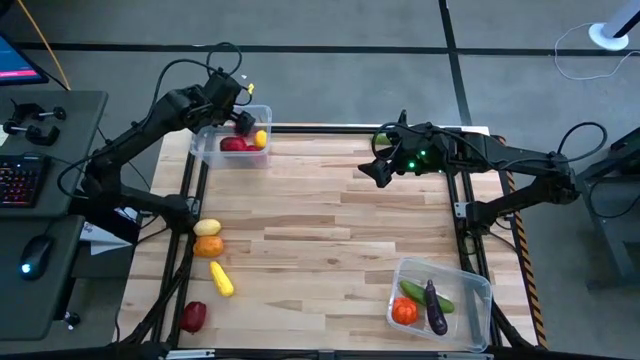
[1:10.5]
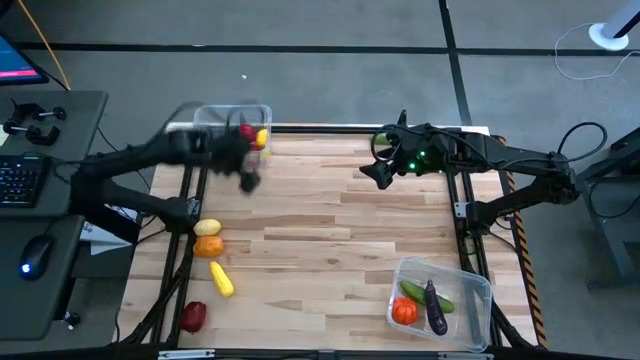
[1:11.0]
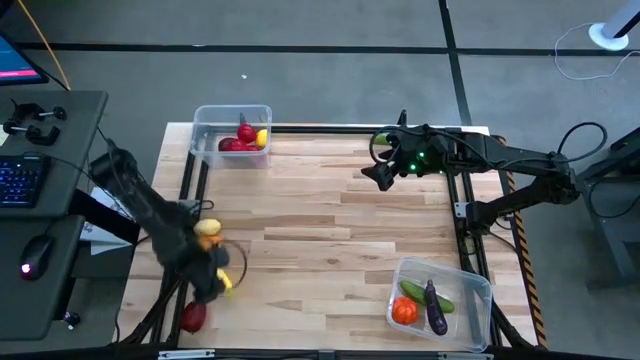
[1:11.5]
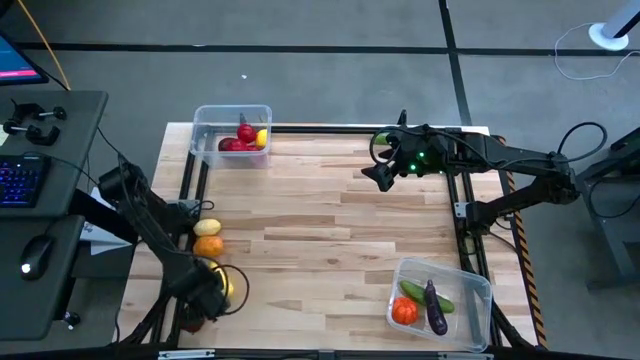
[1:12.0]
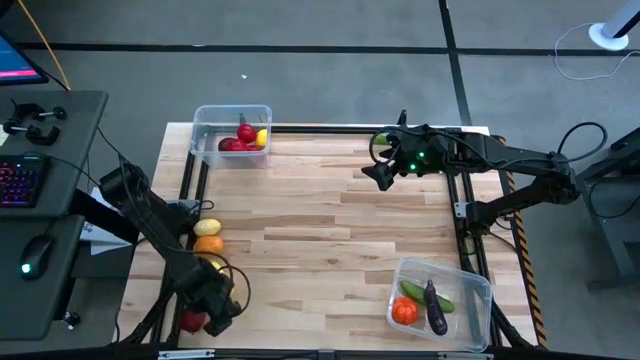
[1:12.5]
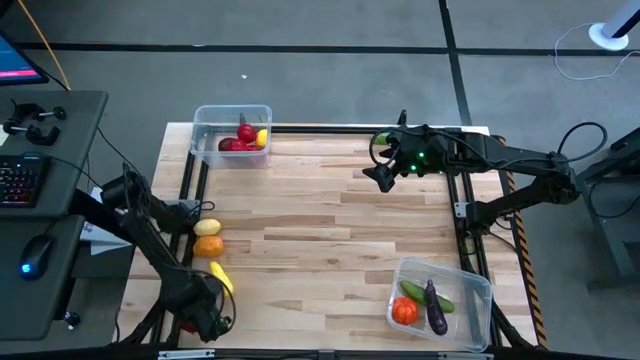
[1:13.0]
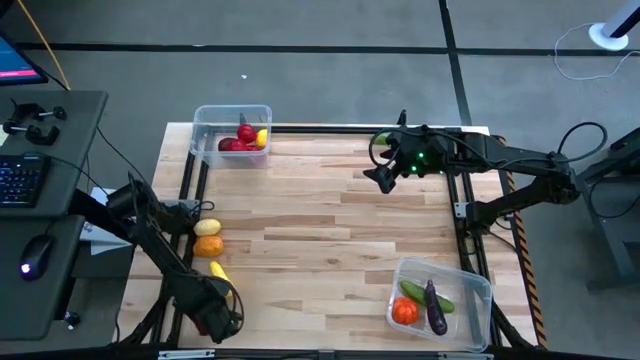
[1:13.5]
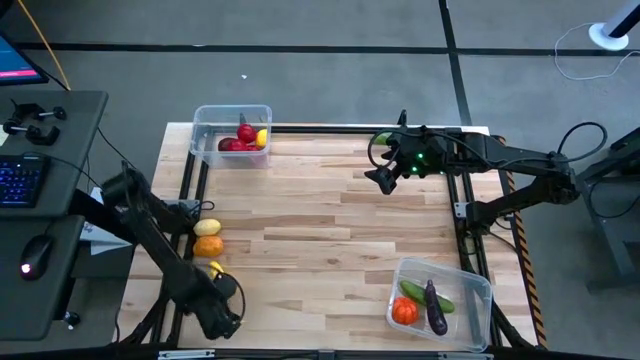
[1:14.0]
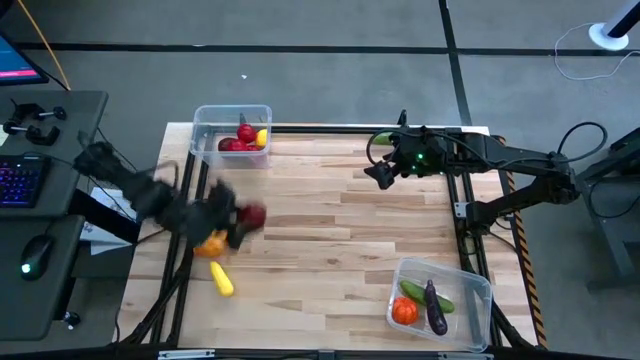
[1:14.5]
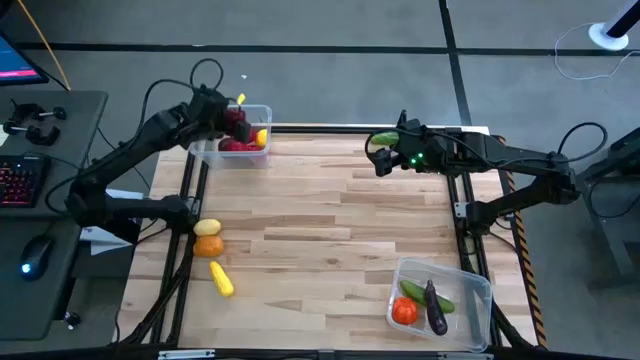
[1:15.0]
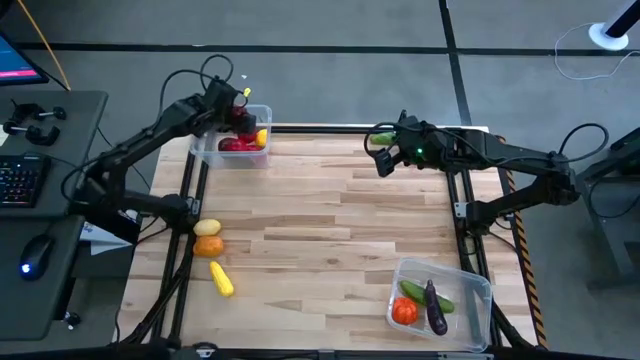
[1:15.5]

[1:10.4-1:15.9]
Task: Sort produce into baskets
Put the red apple into the top transparent bin

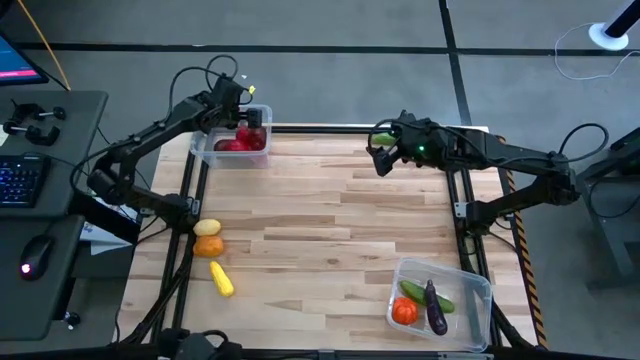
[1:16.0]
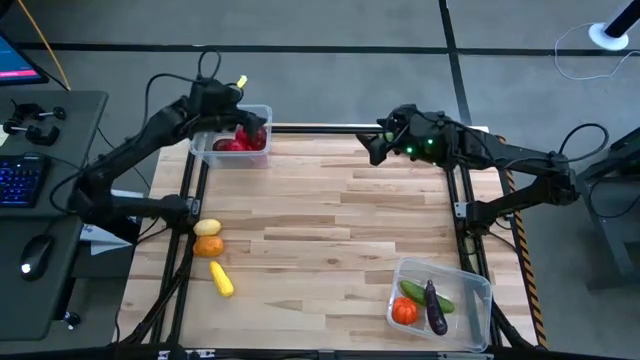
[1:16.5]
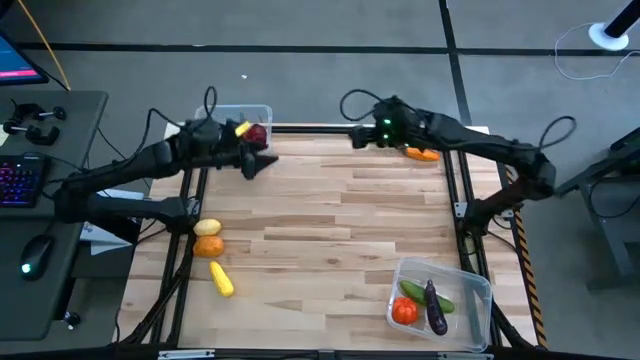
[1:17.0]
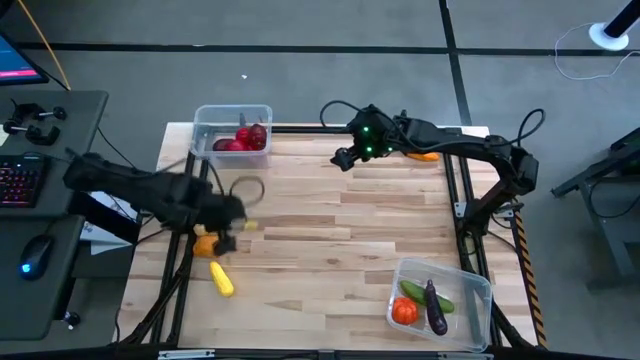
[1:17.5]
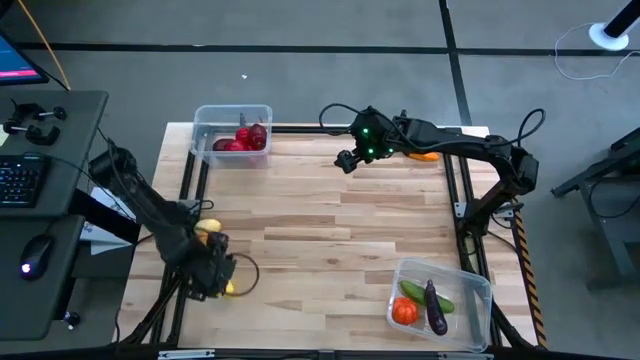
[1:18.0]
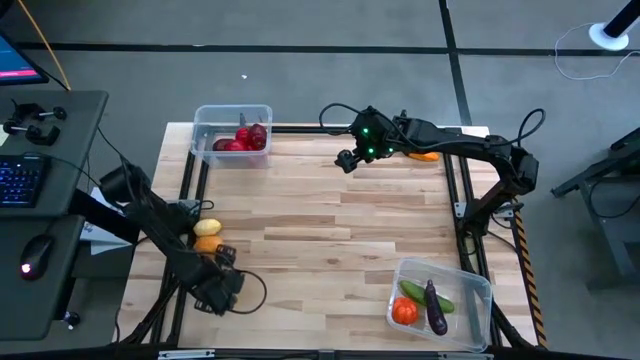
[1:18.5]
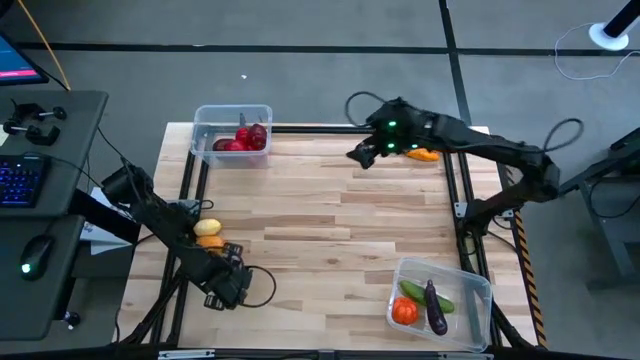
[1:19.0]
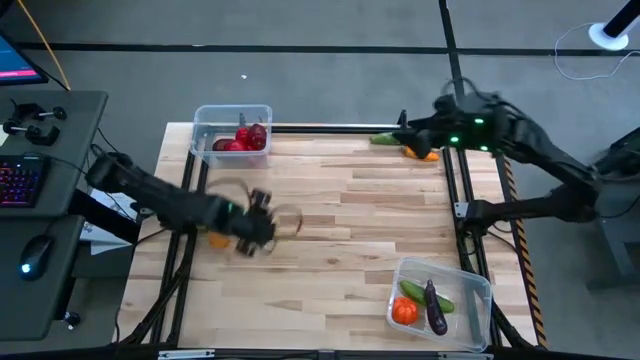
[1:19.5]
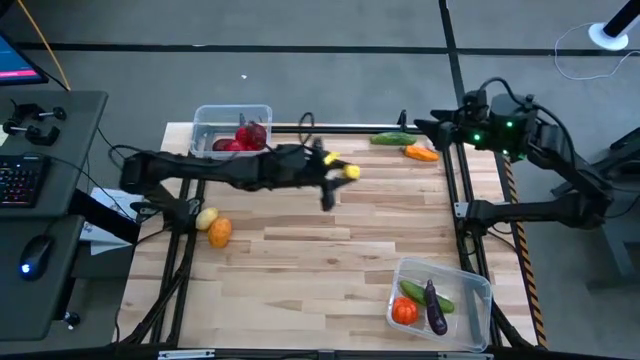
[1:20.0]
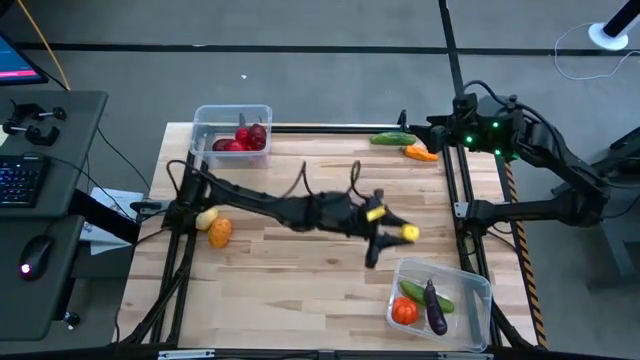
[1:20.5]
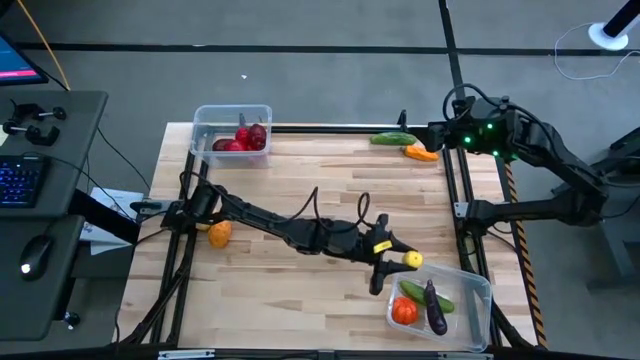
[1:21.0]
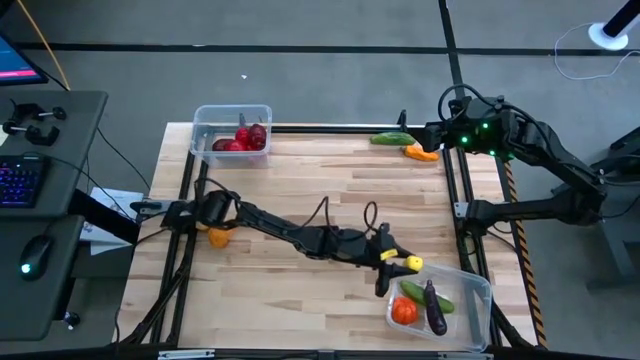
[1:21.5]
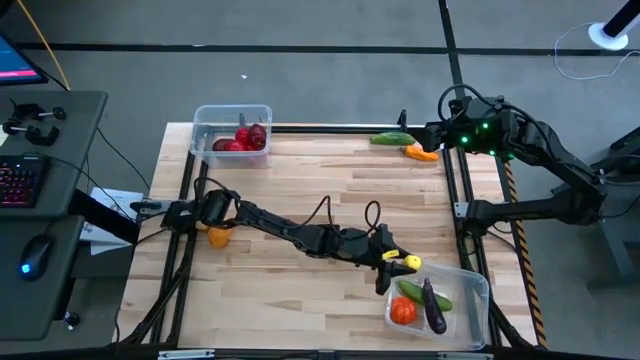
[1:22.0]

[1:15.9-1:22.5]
Put the yellow corn into the bottom transparent bin

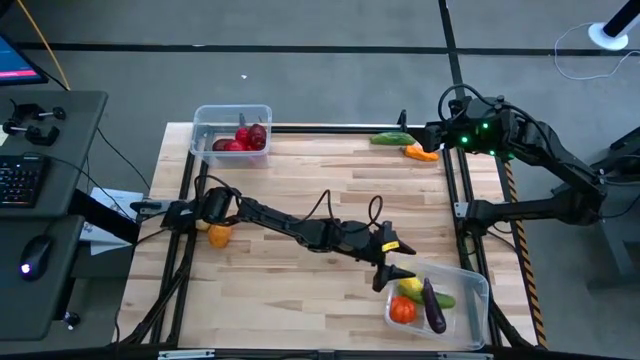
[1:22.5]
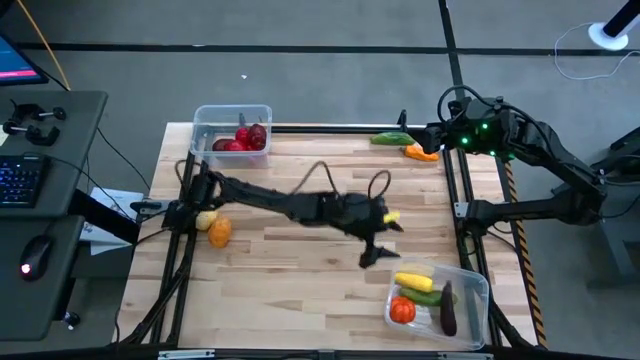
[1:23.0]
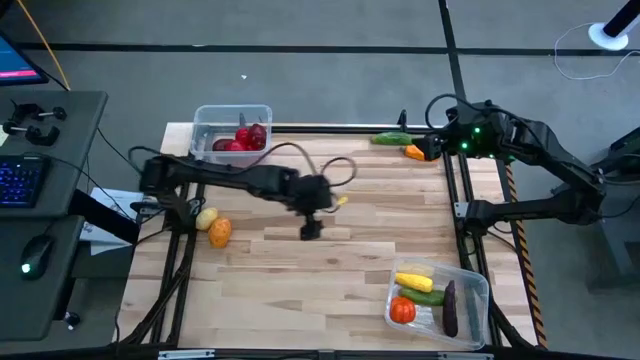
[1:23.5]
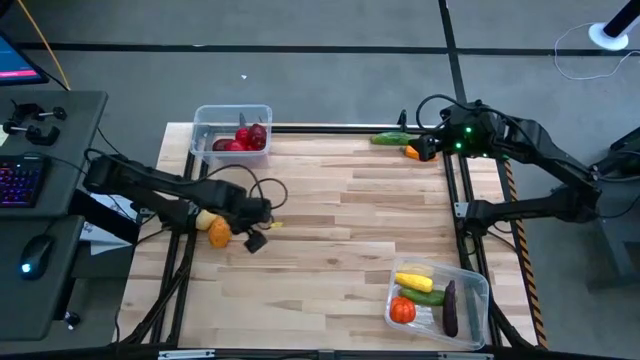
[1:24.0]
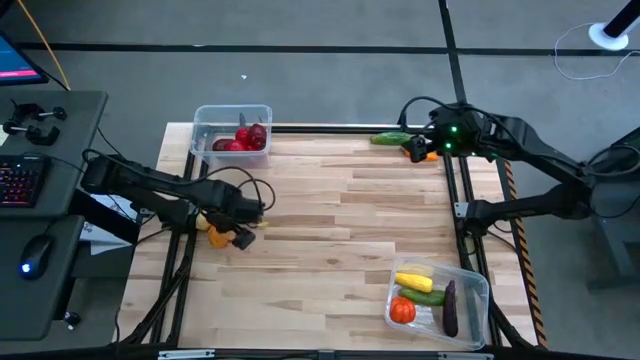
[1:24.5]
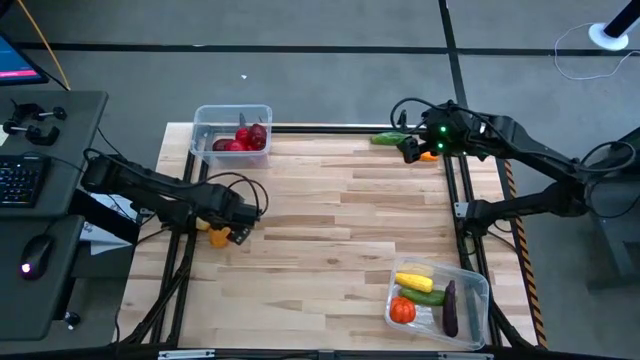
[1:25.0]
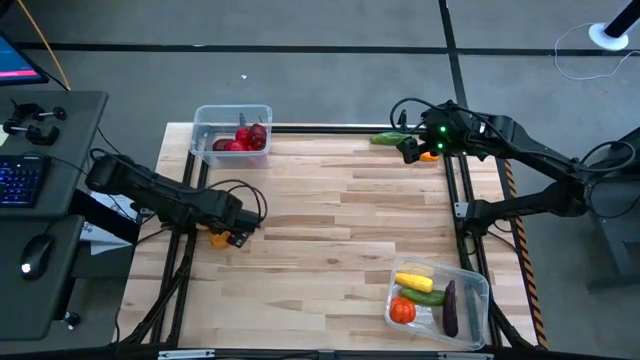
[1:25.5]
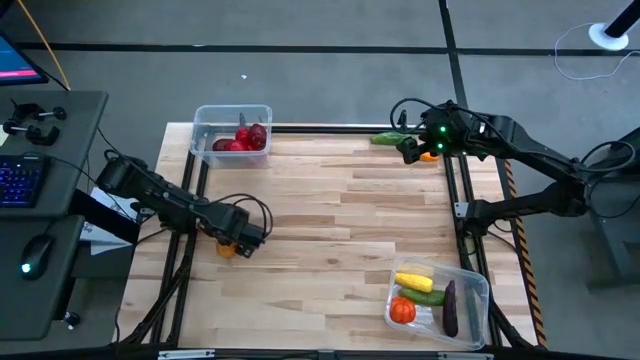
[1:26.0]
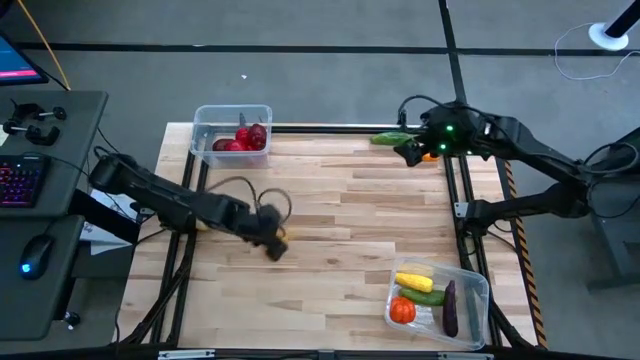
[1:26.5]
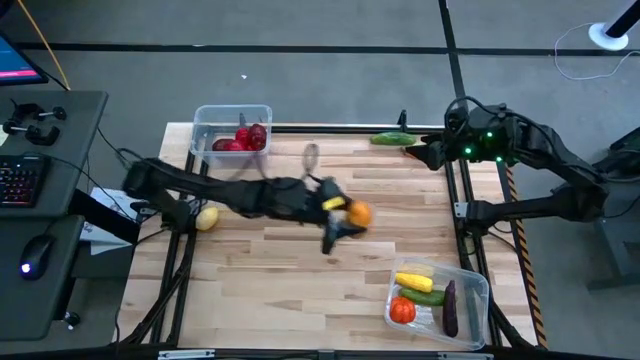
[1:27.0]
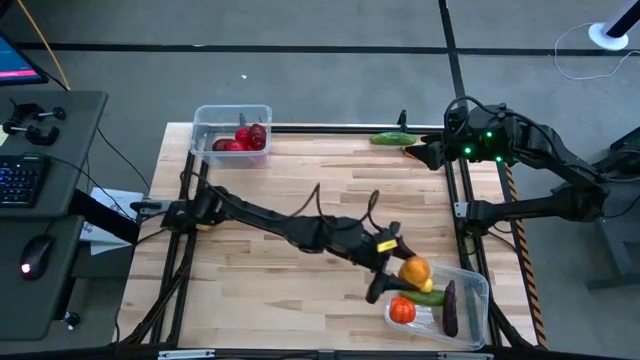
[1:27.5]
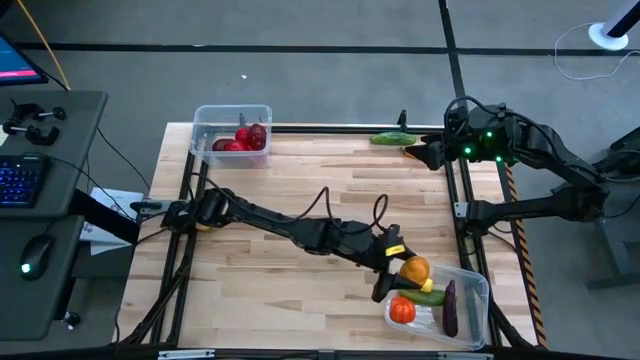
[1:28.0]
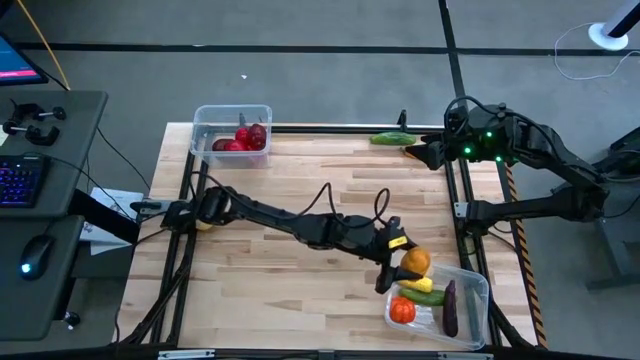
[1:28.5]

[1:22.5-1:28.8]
Put the brown potato into the bottom transparent bin
